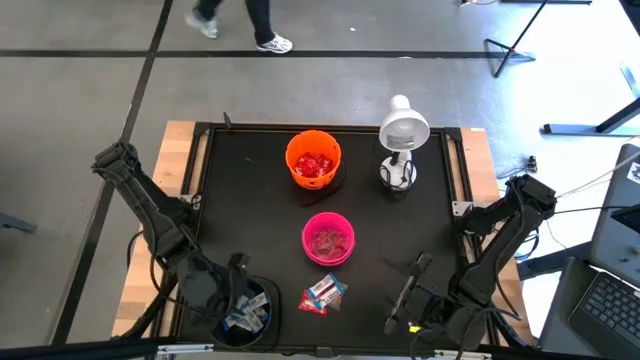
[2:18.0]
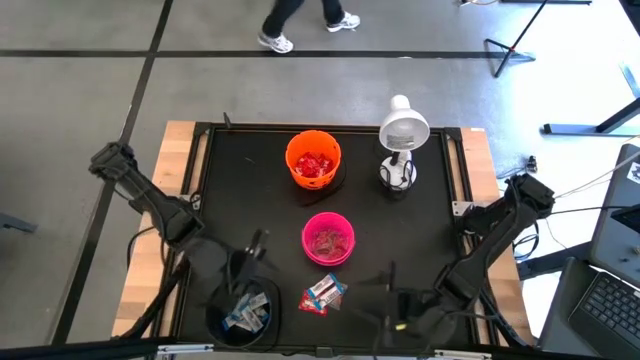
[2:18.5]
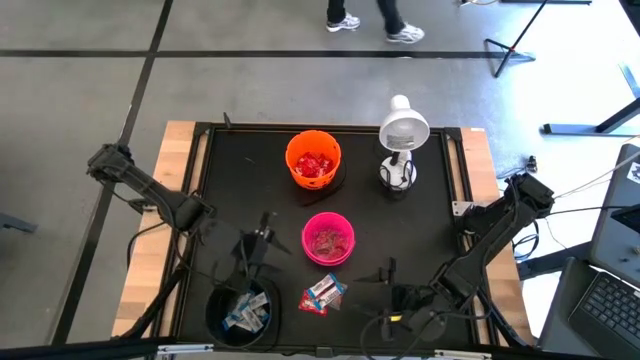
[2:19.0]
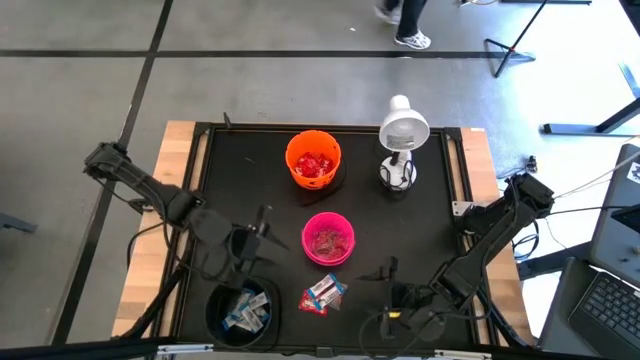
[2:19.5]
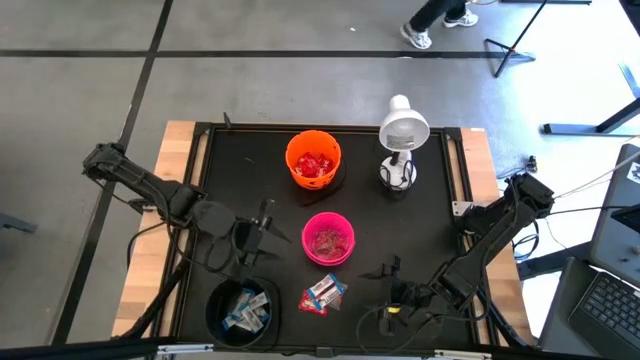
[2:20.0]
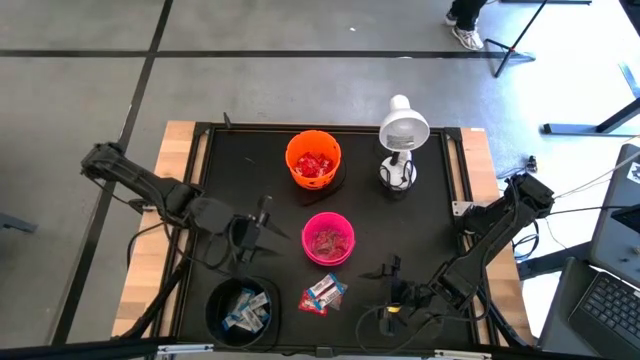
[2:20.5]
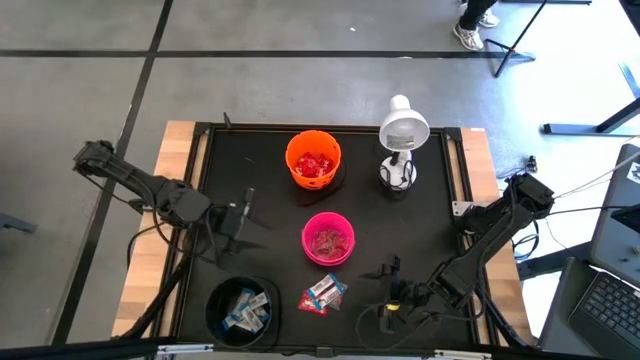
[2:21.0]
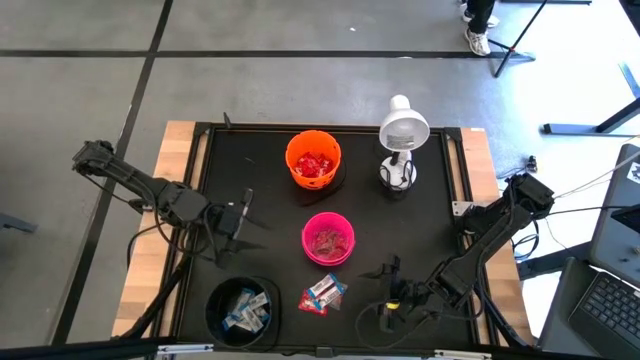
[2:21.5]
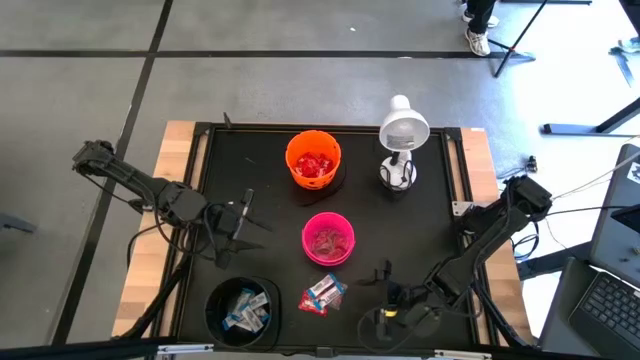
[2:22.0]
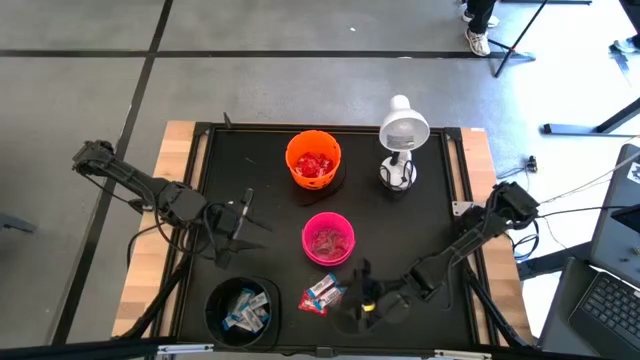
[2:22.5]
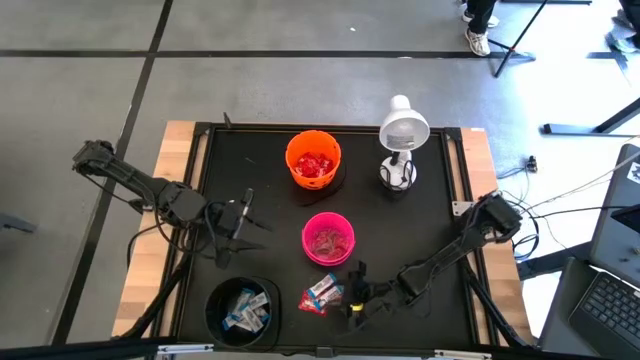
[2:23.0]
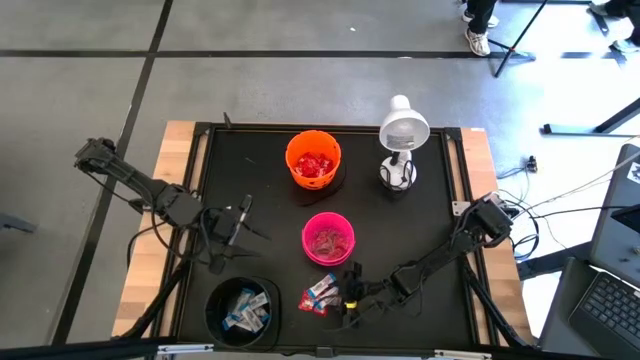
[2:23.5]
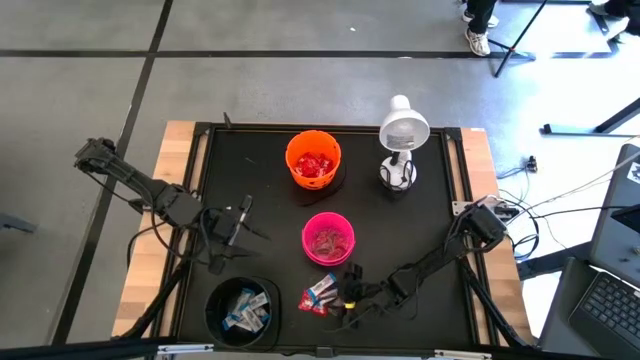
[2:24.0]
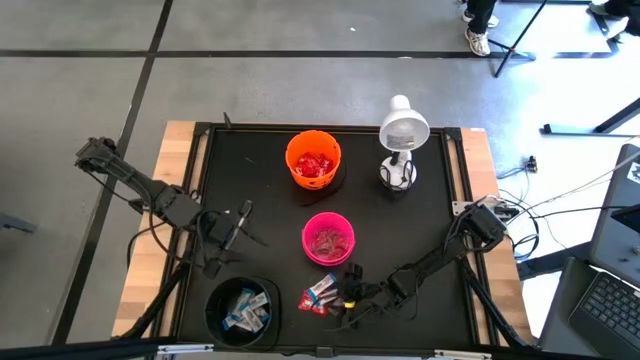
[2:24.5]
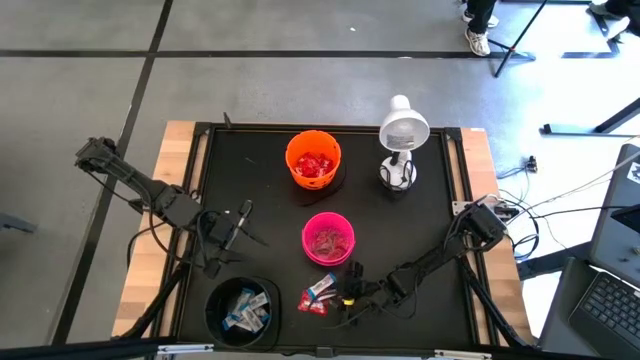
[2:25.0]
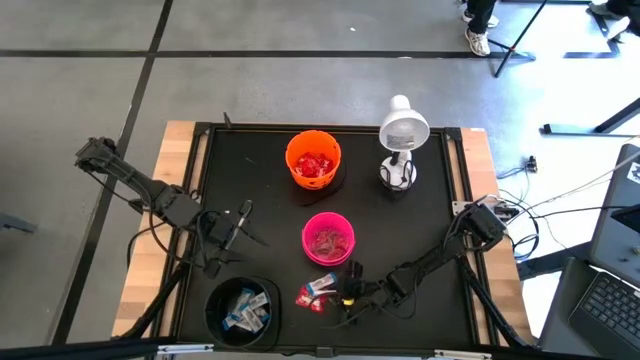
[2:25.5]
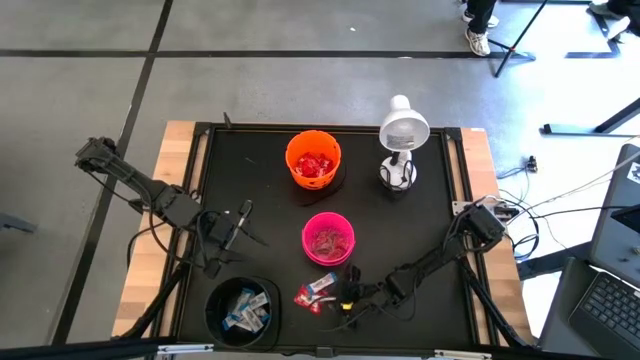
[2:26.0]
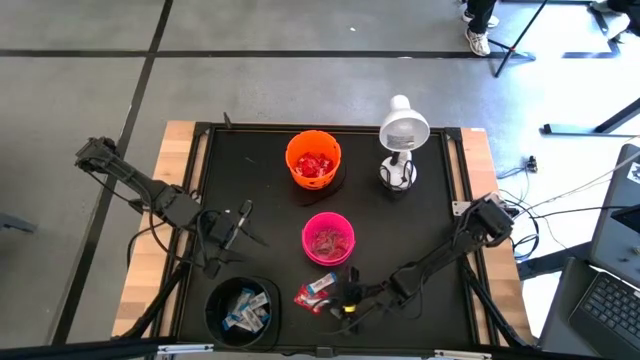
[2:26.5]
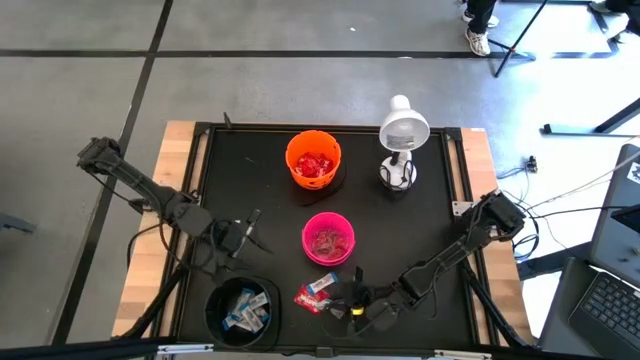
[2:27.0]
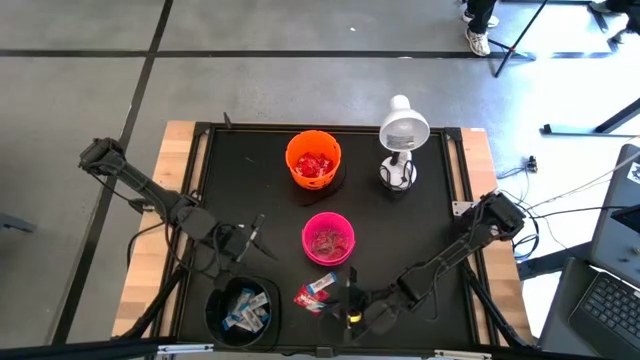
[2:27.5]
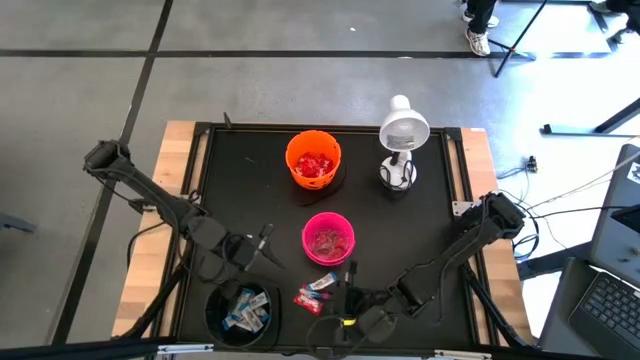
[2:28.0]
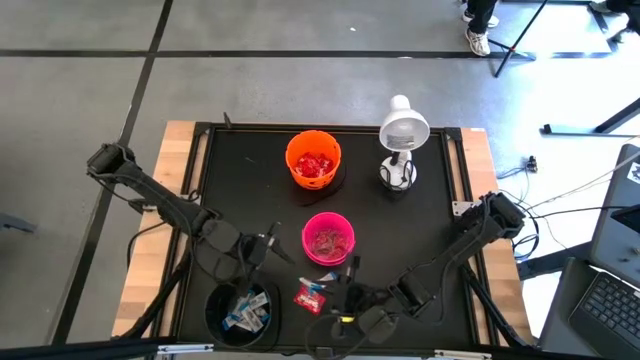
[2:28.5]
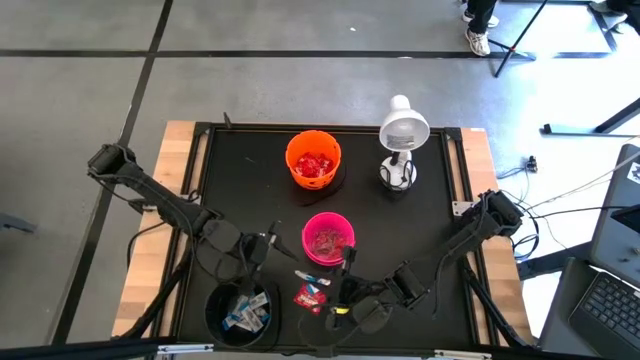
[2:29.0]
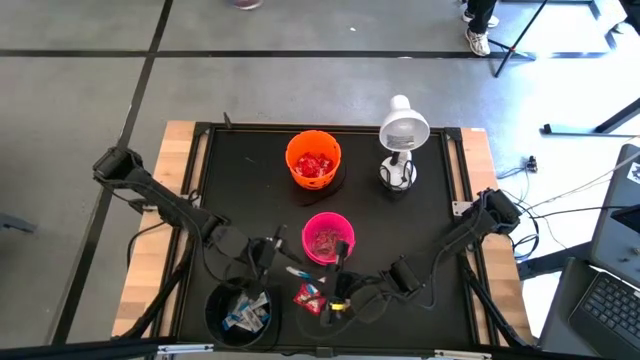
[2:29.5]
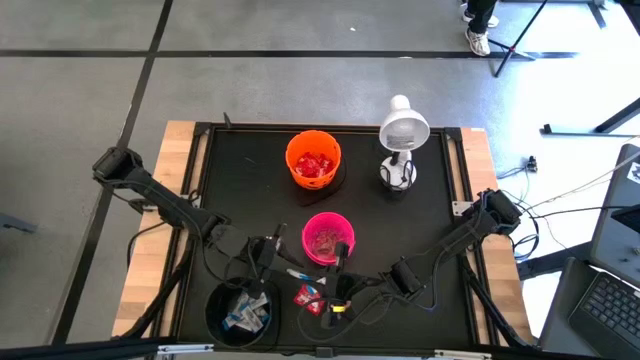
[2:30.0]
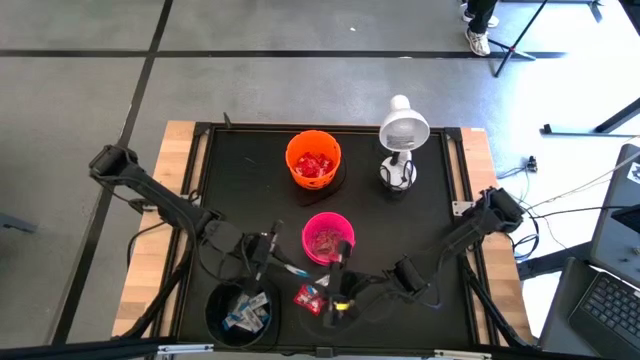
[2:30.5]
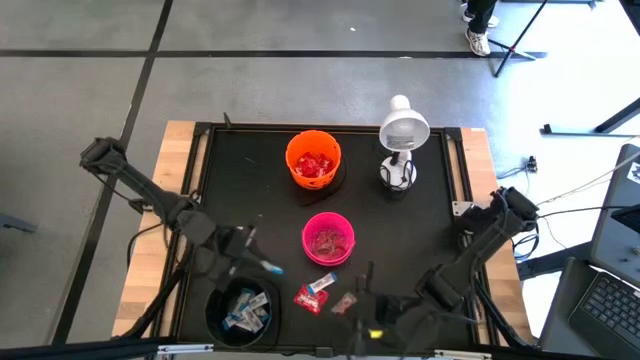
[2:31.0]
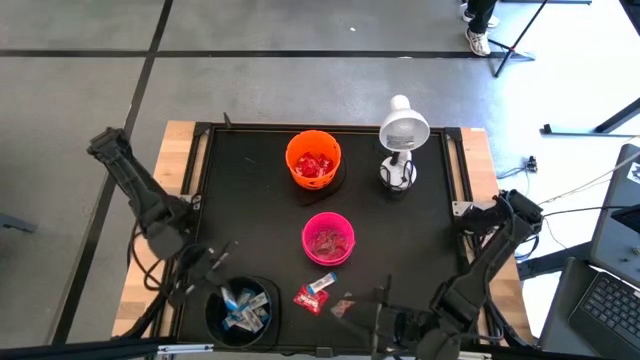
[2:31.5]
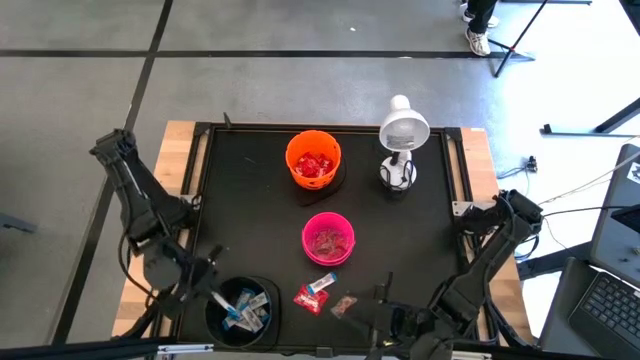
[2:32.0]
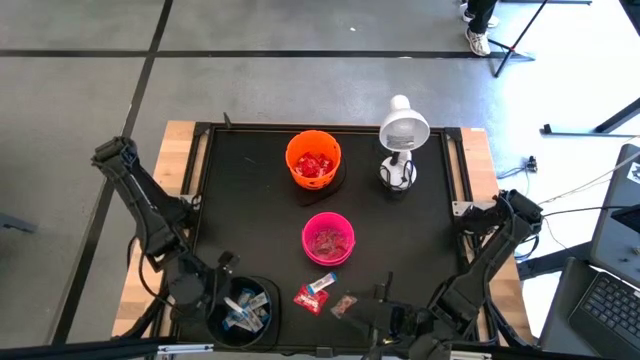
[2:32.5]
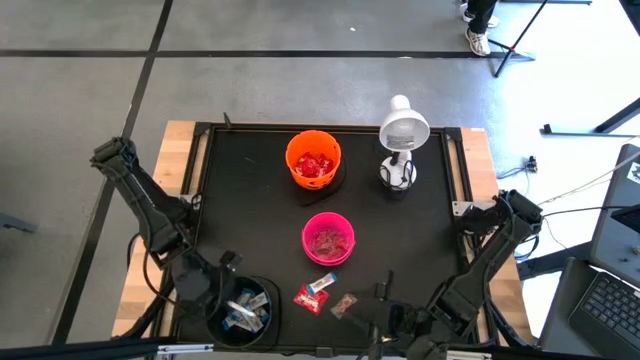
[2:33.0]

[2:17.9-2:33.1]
Task: Sort candy
Put the white chocolate into the black bucket

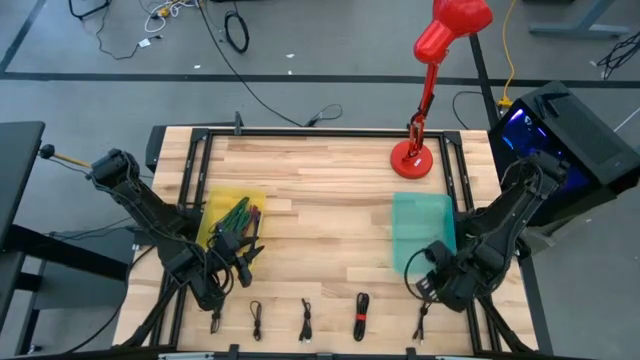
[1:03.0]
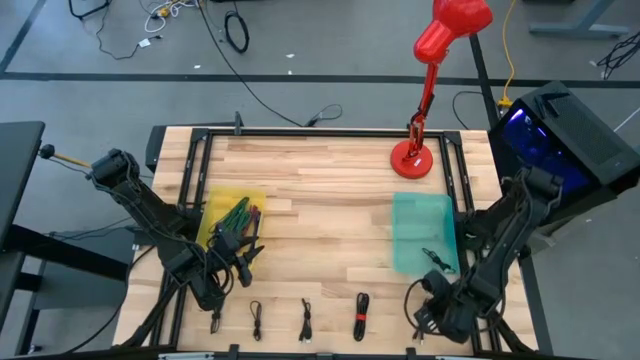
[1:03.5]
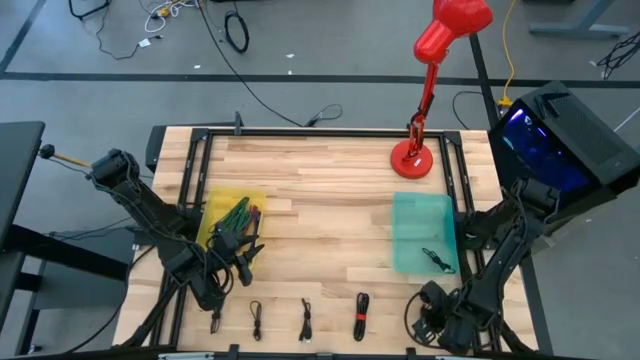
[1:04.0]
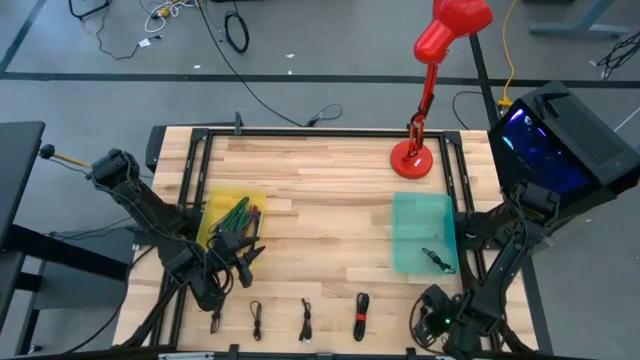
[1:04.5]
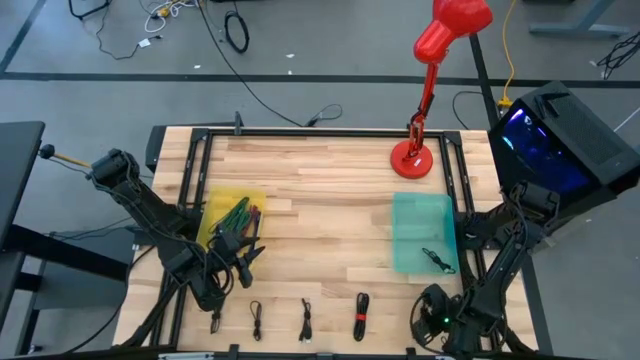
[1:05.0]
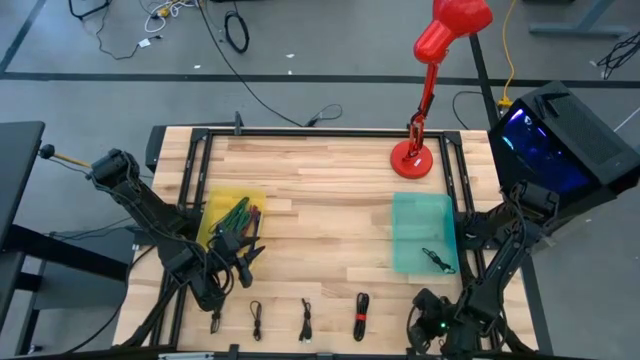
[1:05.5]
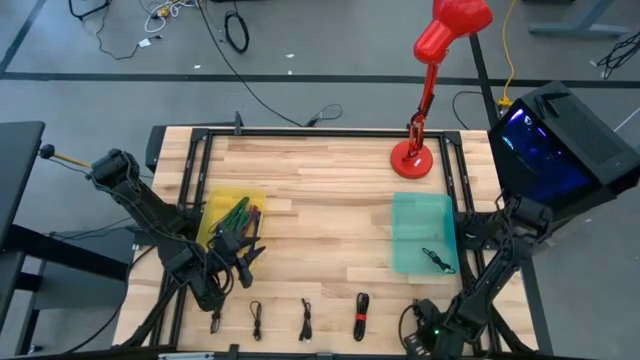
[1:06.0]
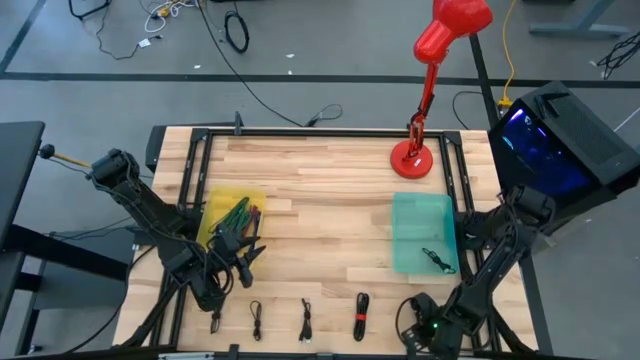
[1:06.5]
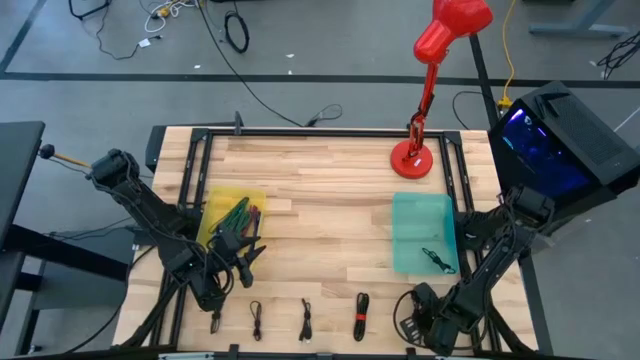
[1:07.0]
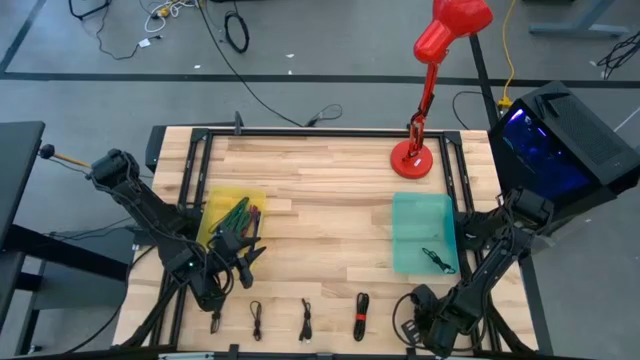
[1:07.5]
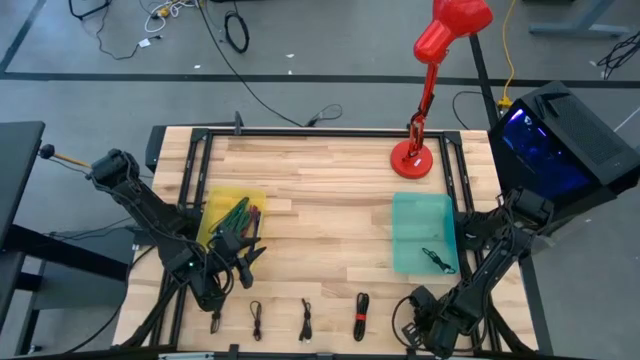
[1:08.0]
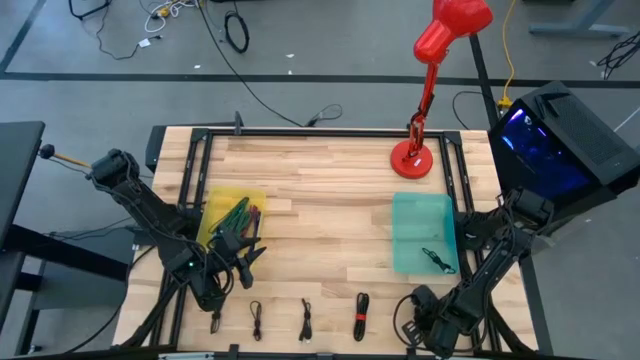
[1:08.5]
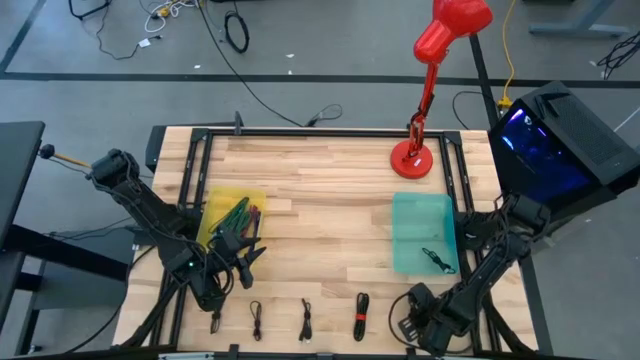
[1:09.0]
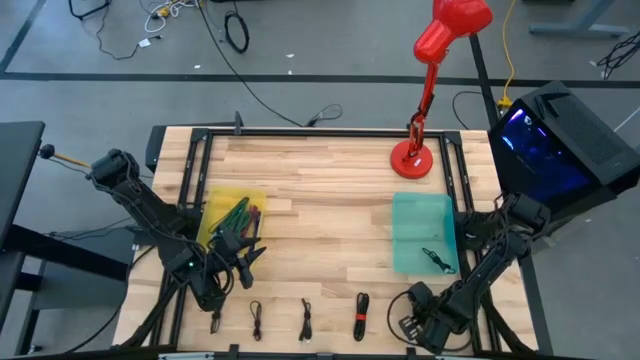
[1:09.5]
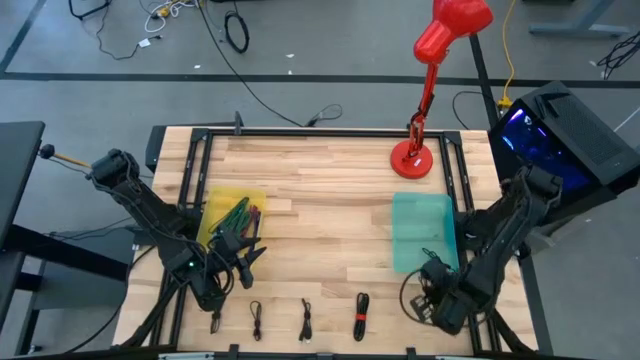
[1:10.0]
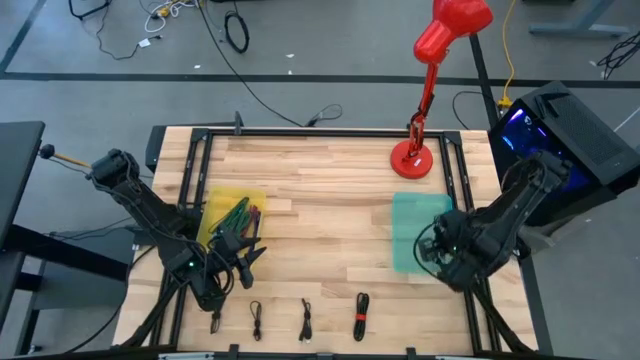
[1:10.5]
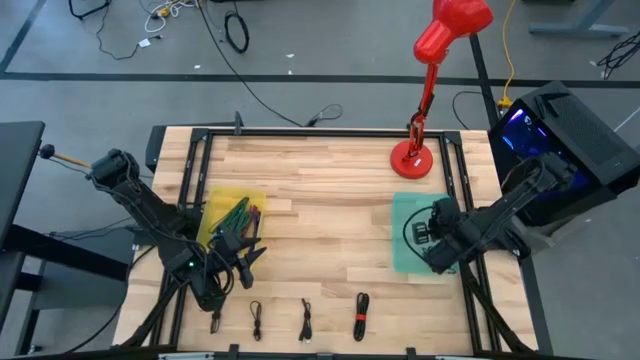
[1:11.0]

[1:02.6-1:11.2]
Task: Pick & Place USB Port
Put the black charger cable into the green bin
